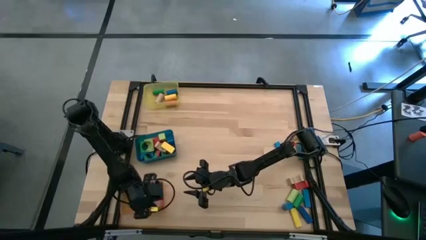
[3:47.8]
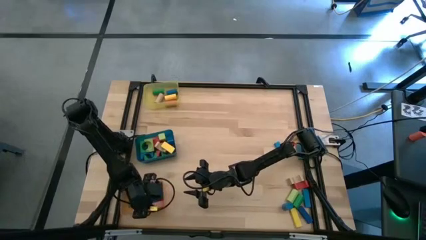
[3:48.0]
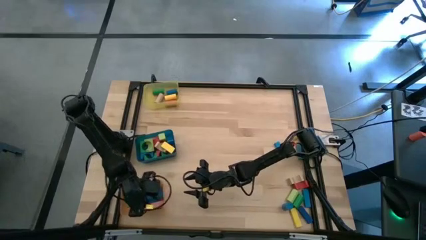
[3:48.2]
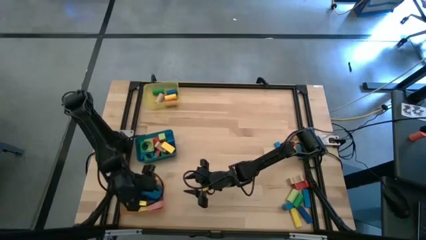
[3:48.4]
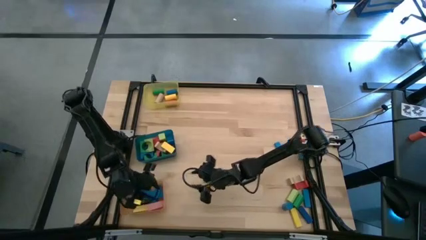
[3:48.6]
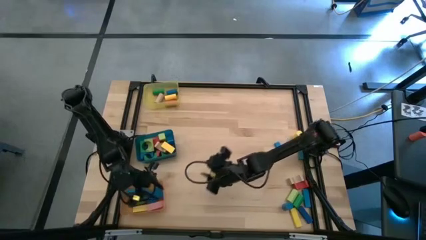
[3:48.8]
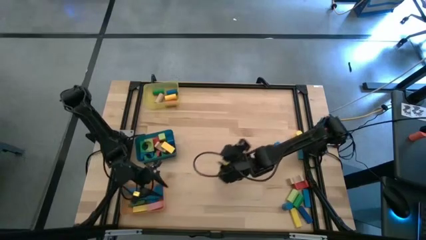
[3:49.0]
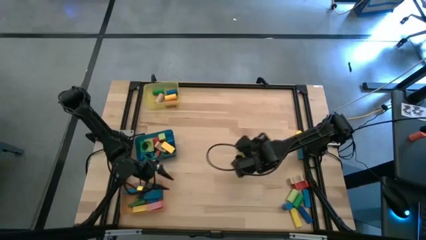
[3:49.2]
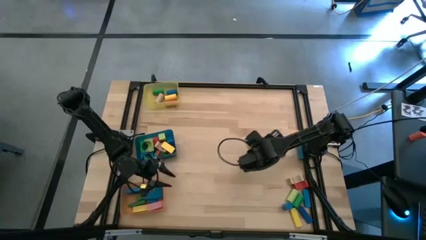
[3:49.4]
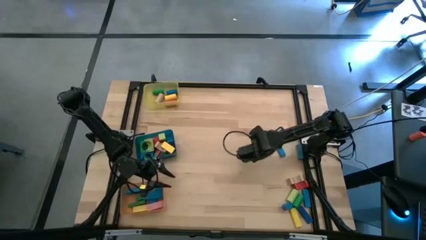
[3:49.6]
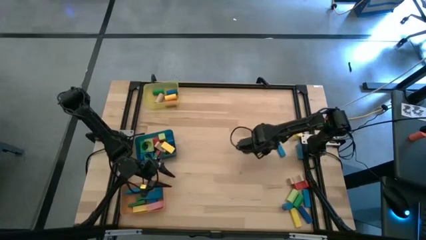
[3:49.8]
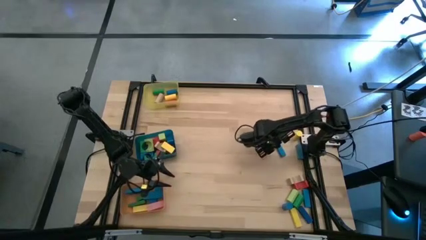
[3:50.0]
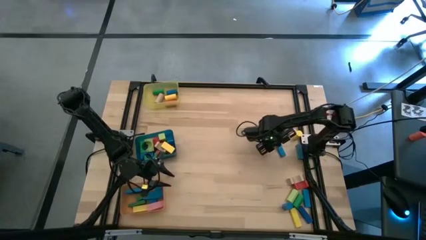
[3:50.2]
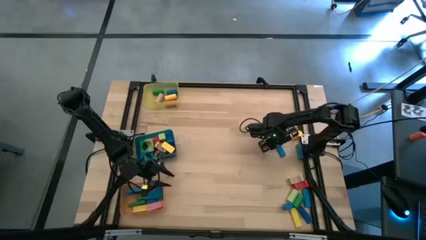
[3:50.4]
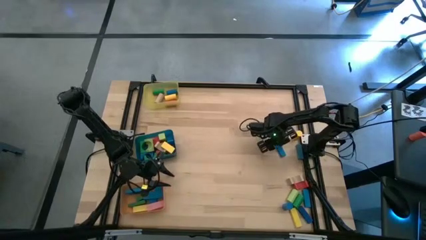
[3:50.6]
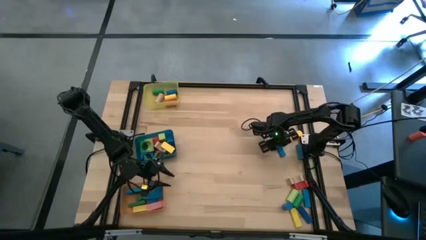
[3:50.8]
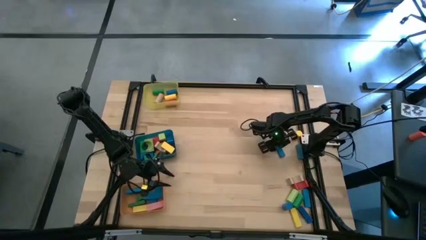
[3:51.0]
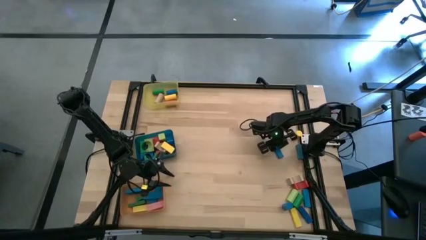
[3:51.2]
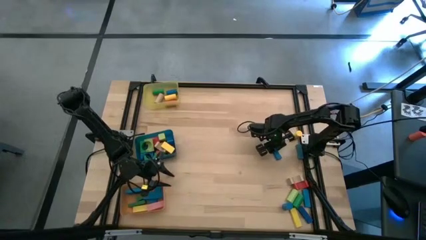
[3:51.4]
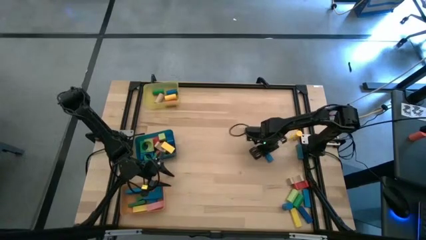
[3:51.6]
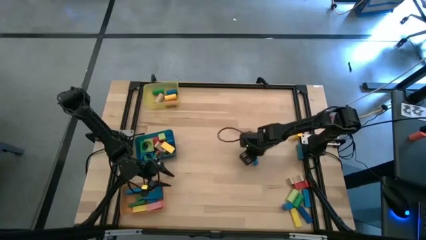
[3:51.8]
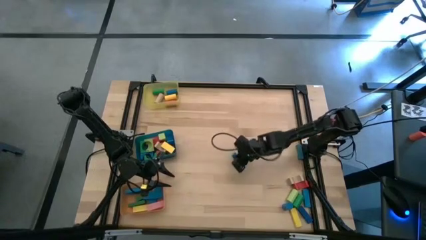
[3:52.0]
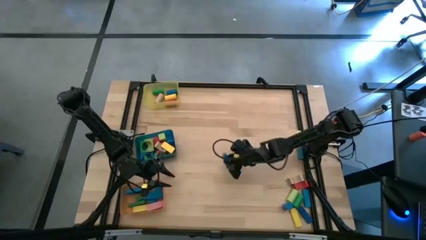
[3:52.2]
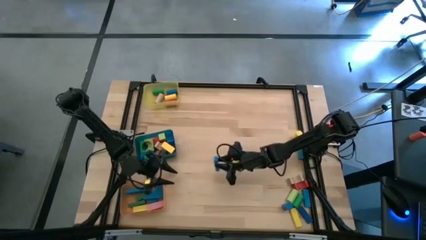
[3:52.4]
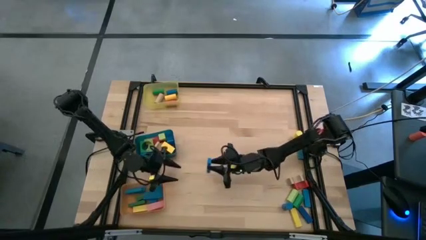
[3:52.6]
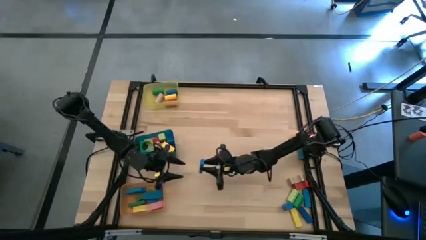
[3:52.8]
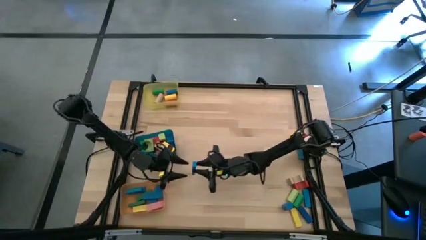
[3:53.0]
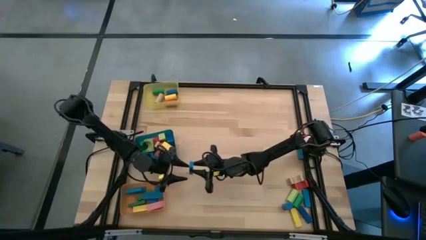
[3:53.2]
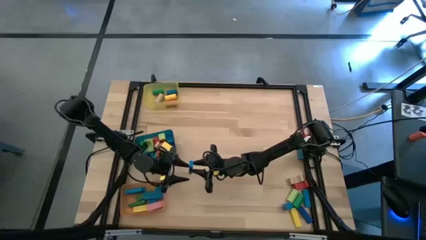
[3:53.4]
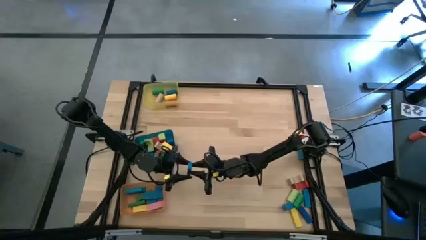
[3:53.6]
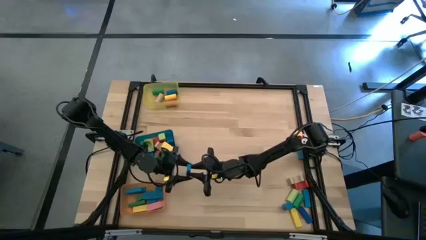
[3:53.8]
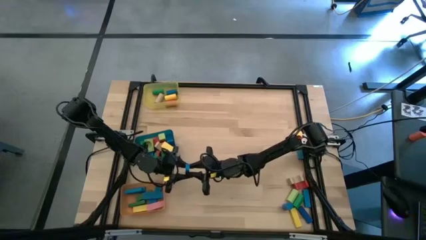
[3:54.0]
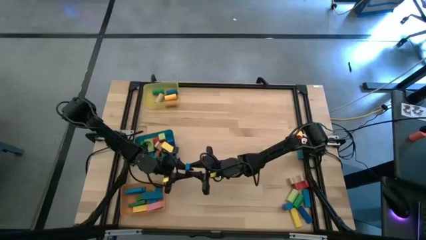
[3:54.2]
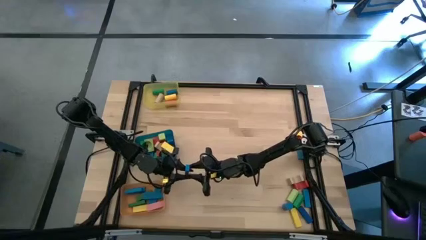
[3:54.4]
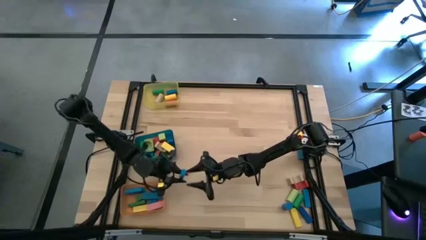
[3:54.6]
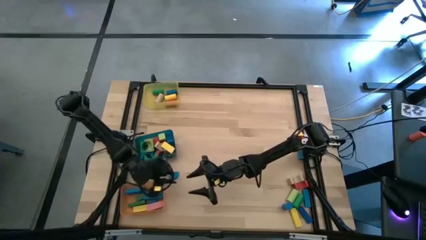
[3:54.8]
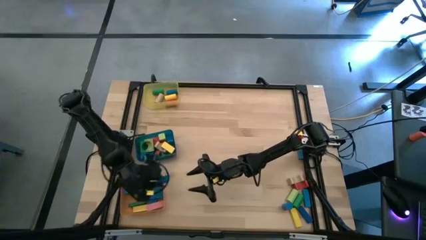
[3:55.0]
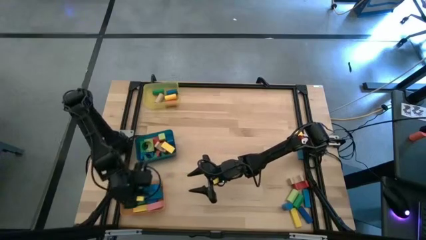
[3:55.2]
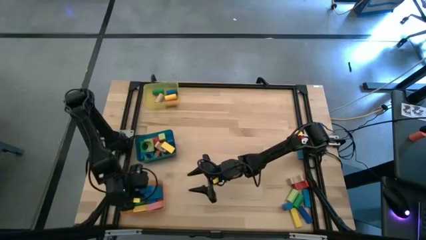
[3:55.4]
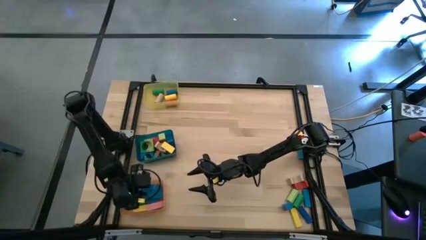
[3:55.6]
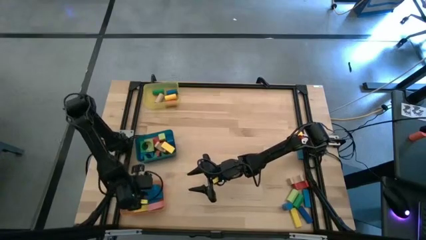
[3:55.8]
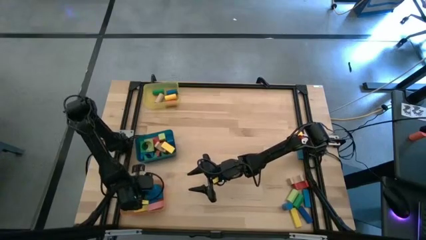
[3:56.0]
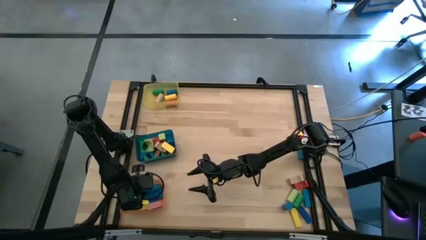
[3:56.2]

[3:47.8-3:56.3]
Task: Sort blocks by size
Put the blue block into the orange bin

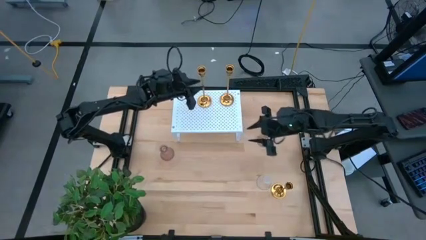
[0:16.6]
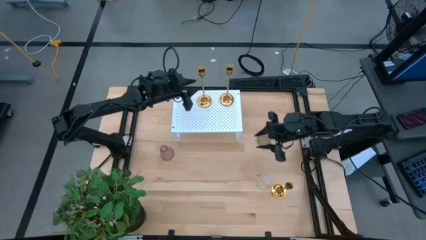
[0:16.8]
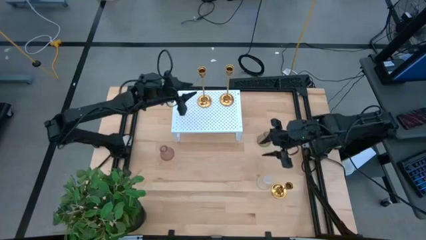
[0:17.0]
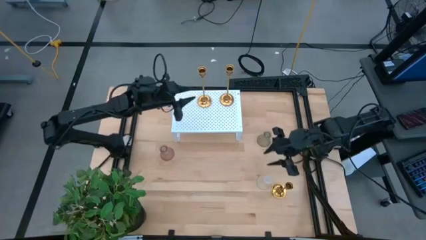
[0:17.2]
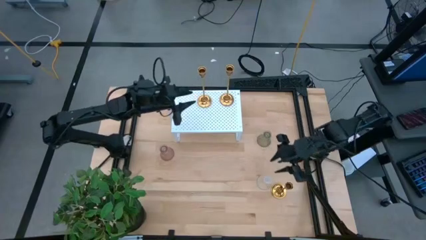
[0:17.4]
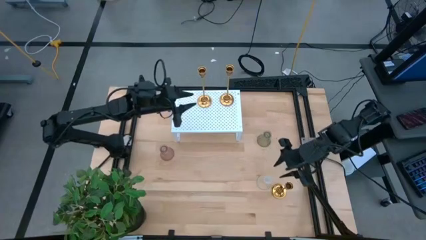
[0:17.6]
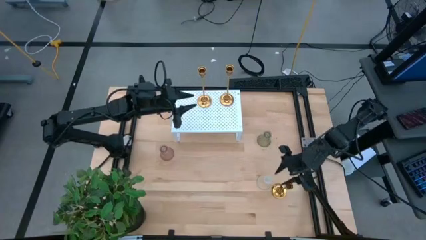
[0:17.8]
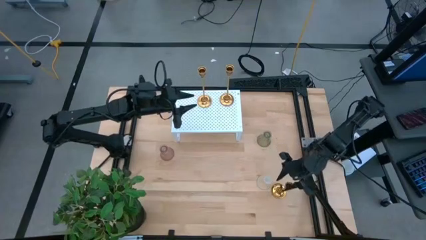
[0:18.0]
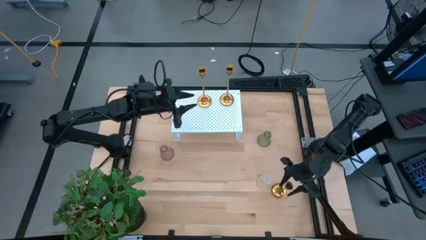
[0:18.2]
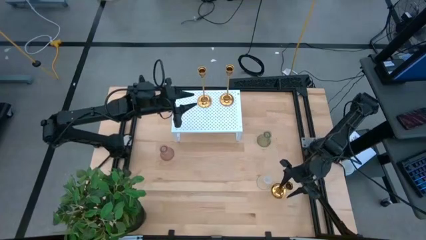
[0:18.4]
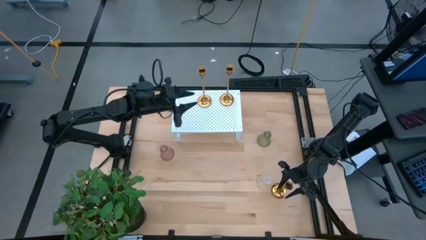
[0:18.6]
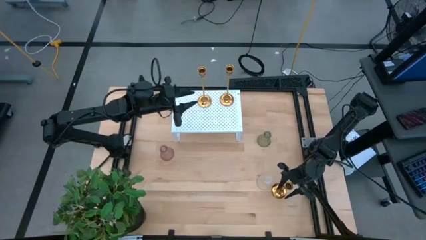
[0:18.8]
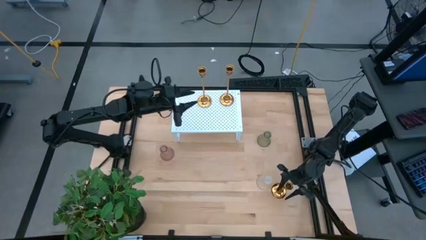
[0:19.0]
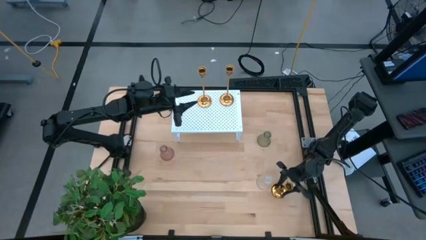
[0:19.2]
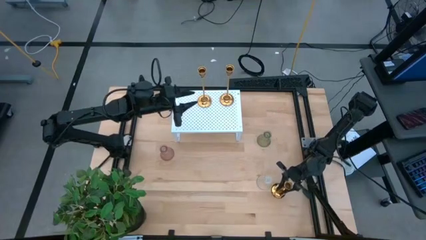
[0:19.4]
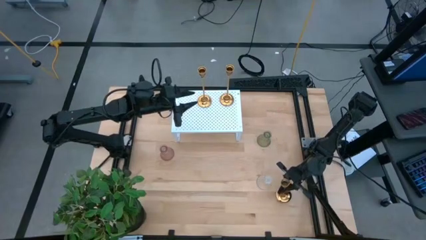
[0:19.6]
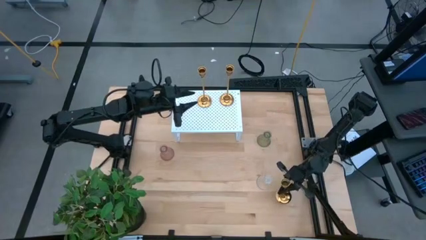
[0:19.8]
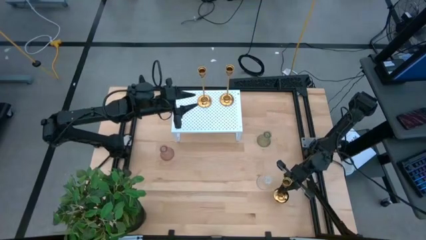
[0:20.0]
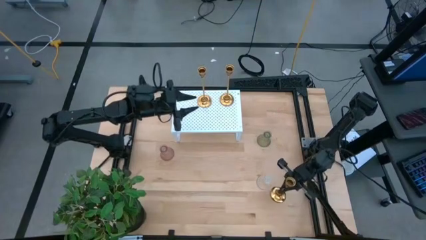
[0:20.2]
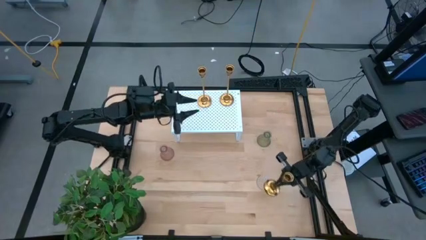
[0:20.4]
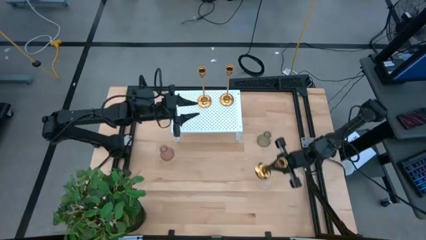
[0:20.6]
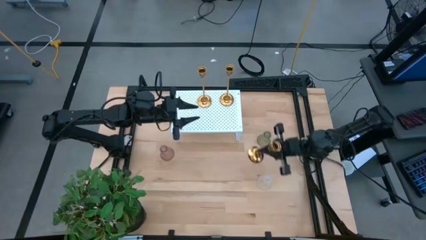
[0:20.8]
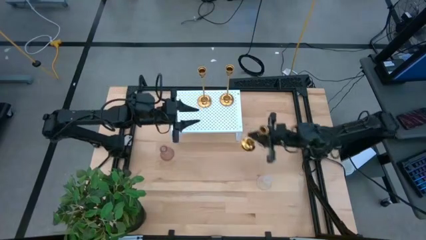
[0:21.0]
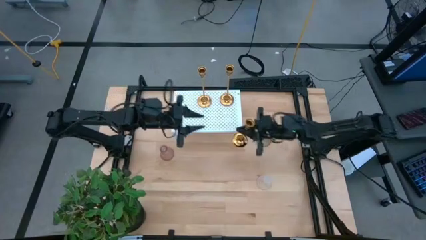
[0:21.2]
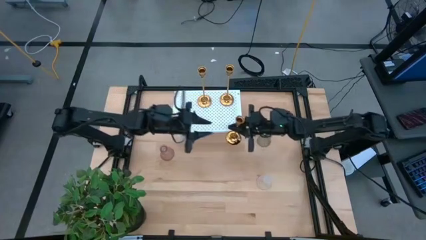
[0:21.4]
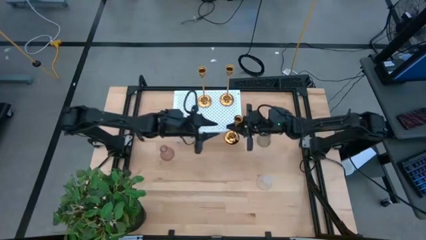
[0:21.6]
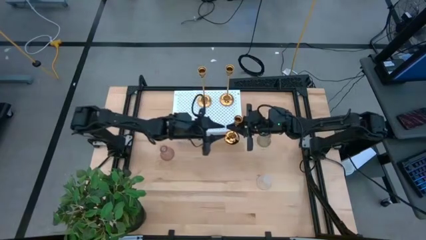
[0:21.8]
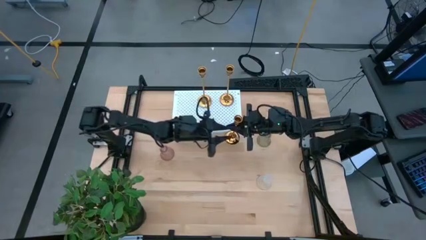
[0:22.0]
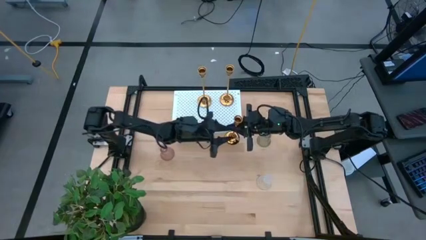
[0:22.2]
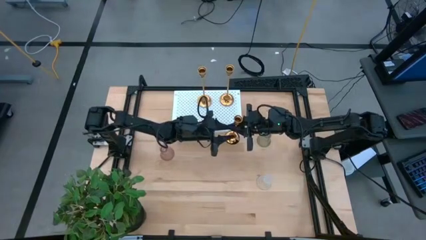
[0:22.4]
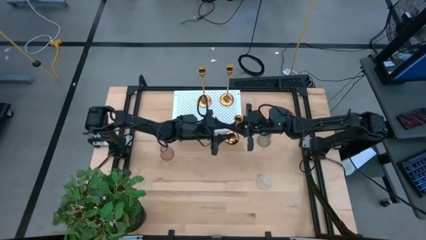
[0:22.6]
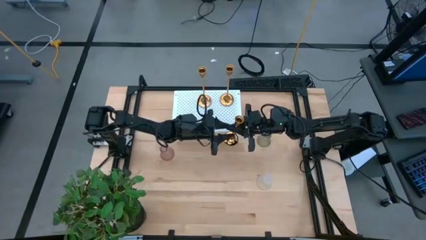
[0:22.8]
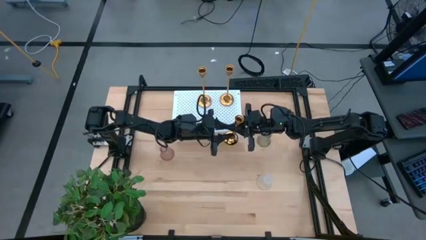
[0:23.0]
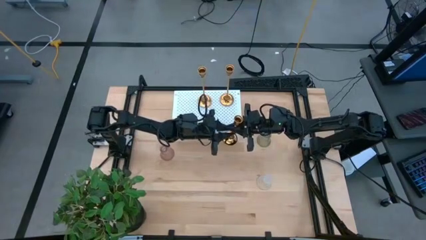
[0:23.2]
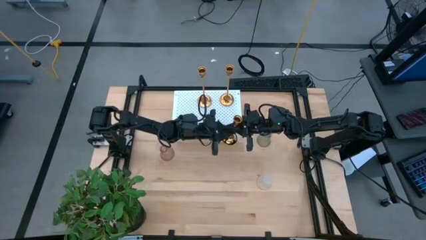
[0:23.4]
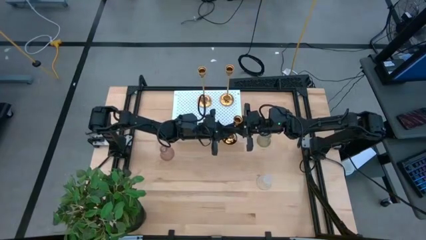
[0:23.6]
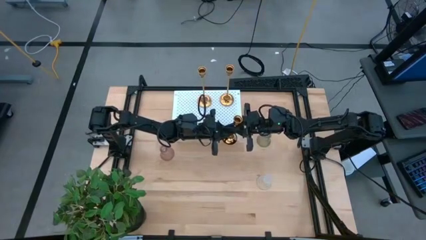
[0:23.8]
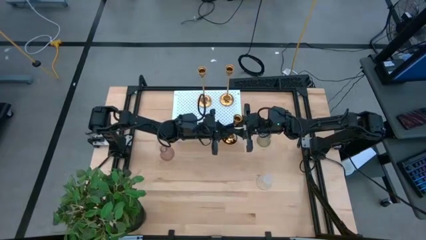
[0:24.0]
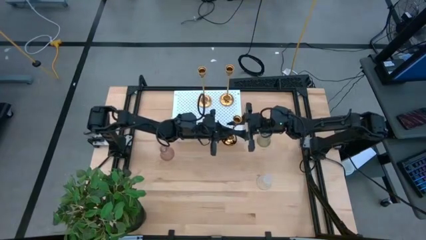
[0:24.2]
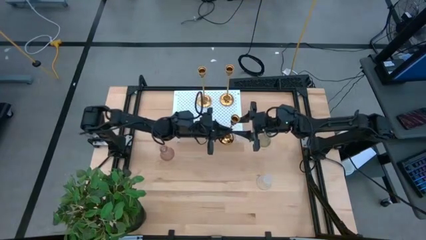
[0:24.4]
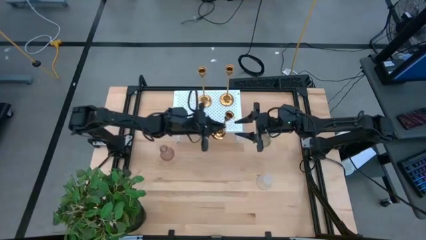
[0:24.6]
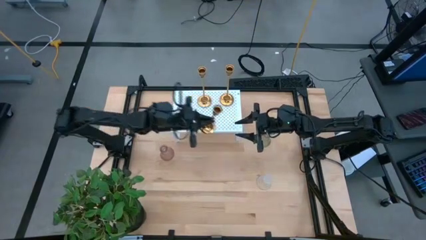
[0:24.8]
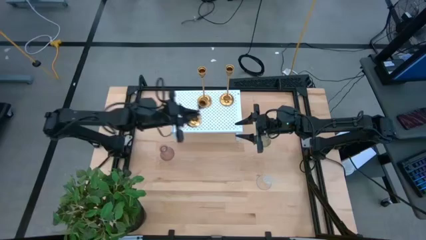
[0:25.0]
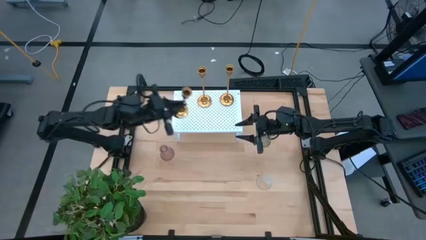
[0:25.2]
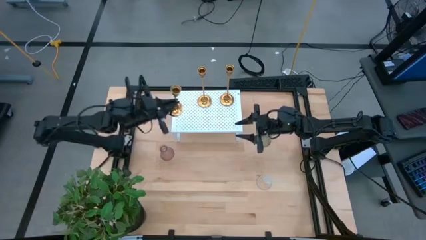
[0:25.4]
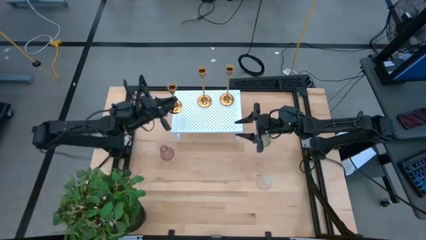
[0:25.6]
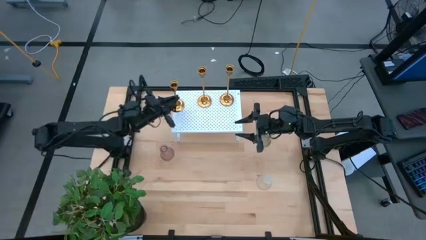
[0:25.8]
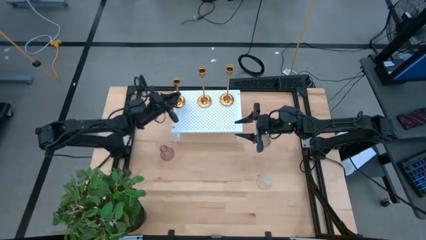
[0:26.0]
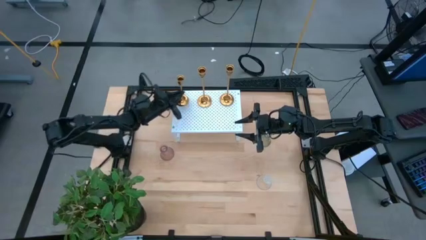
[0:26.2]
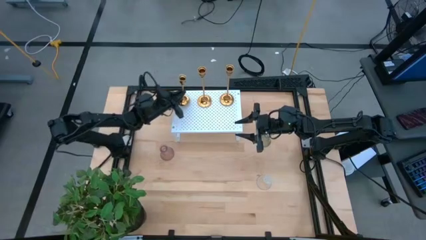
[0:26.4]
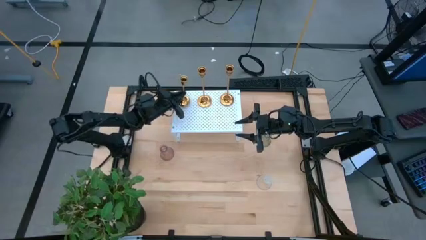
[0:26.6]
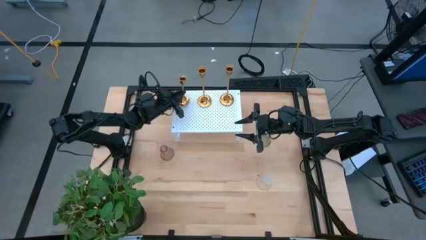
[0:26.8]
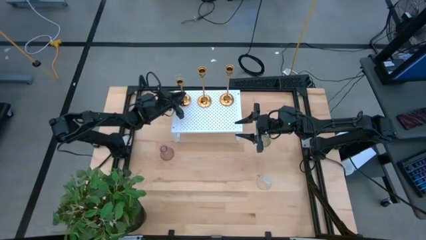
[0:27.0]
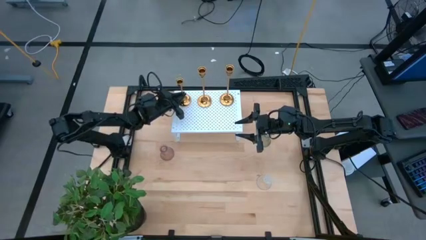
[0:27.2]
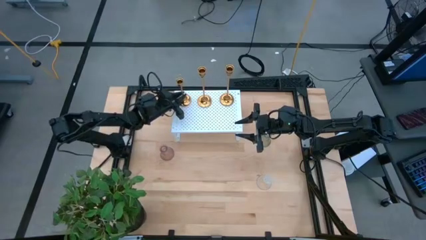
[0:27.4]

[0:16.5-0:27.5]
Task: Pick & Place candle stick holders
Put the small gold candle holder on the shelf aligned with the other gold candle holders
